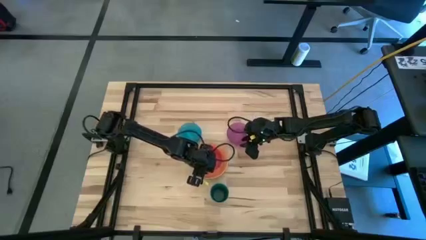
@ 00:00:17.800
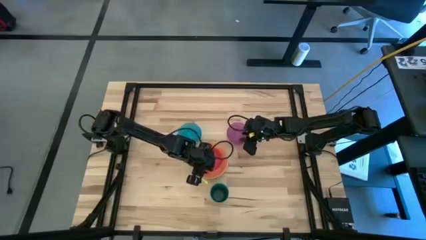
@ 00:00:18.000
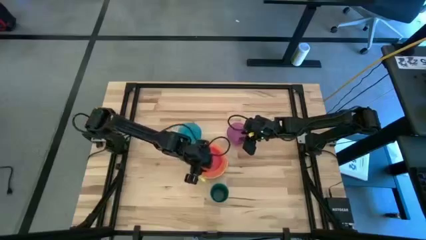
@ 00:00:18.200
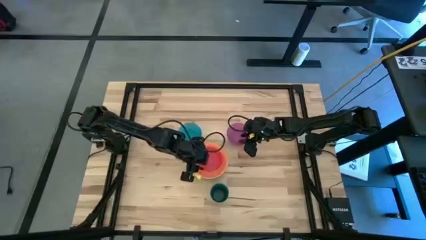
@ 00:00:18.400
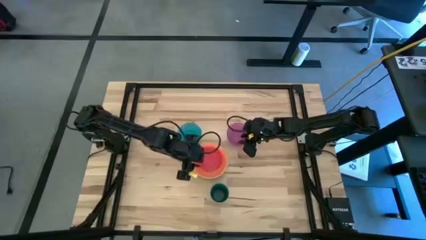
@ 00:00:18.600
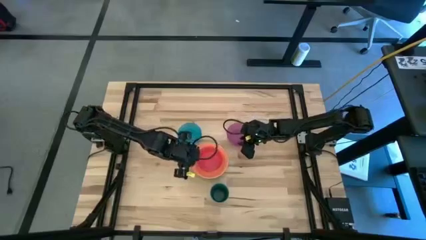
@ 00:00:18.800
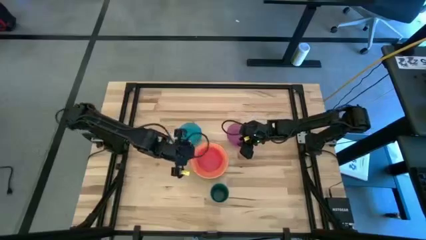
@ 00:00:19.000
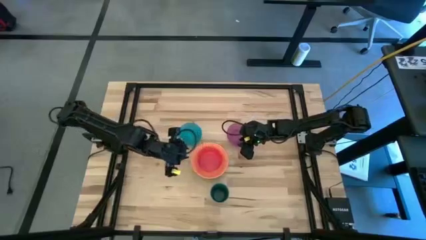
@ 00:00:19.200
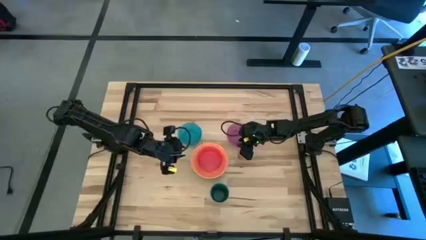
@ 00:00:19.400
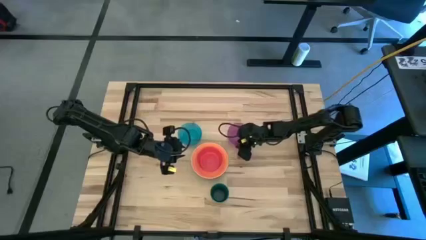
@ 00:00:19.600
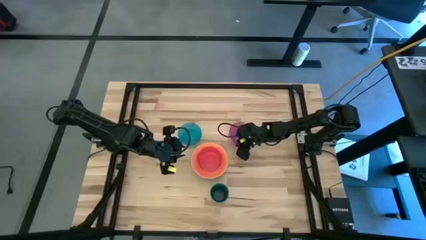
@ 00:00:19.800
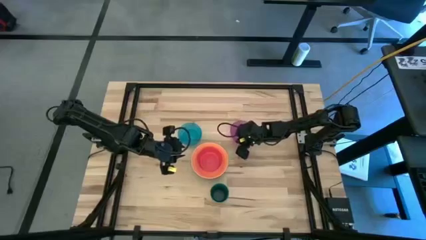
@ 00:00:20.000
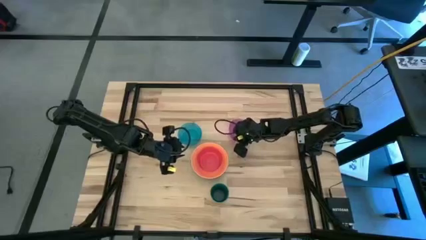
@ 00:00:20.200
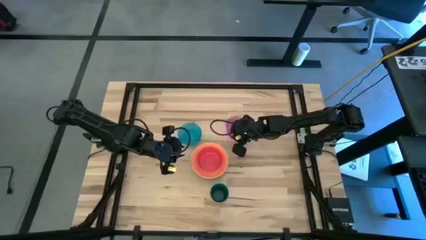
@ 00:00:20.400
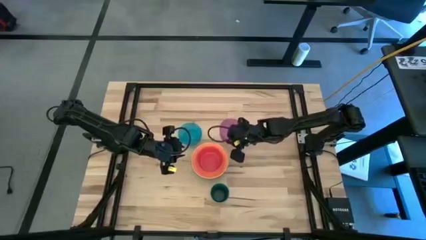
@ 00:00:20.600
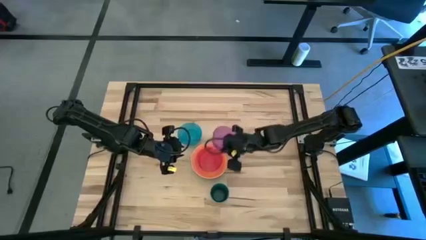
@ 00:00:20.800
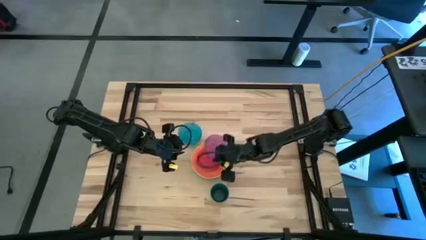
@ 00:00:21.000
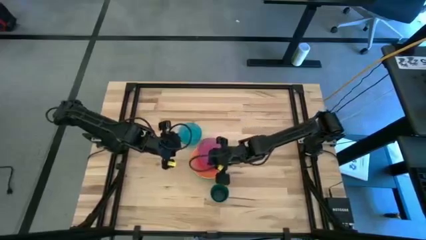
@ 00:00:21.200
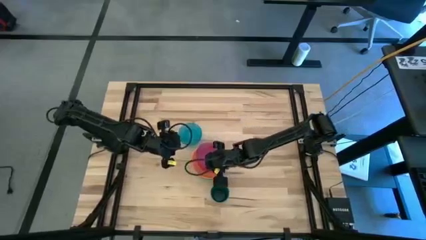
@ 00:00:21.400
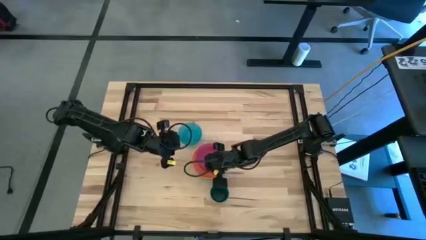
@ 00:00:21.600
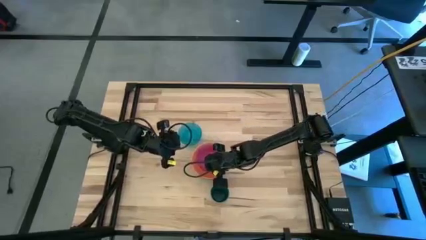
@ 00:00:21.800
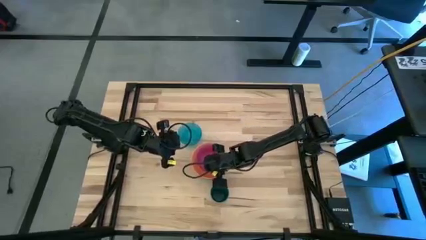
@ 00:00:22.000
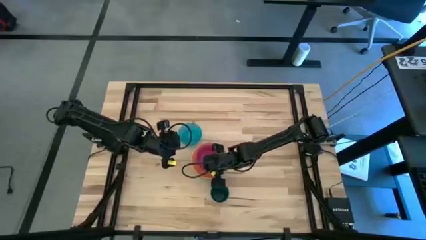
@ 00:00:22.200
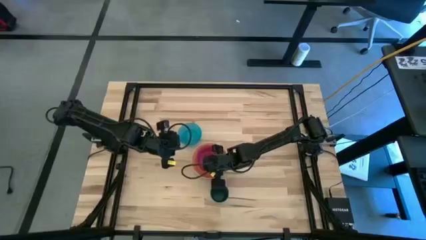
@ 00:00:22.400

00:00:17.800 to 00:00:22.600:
Stack the violet bowl on top of the red bowl

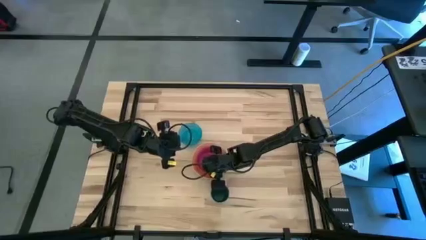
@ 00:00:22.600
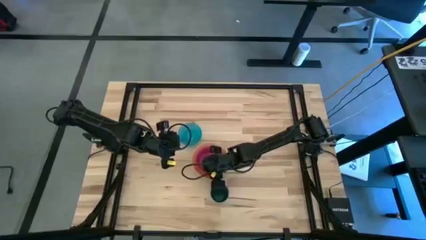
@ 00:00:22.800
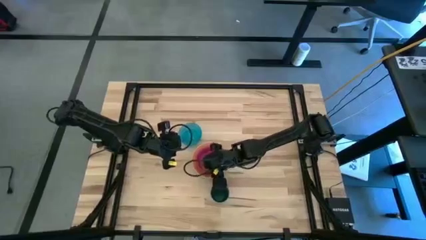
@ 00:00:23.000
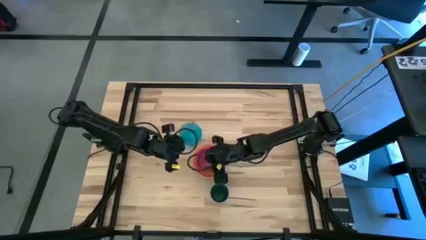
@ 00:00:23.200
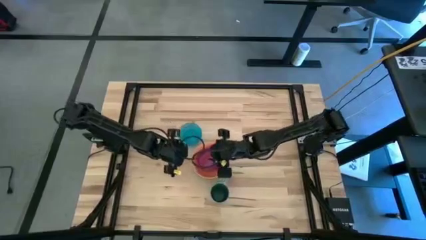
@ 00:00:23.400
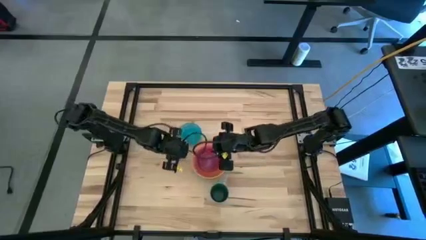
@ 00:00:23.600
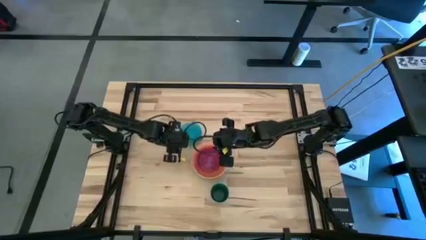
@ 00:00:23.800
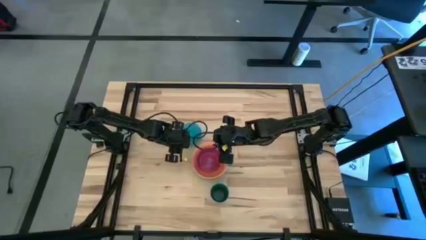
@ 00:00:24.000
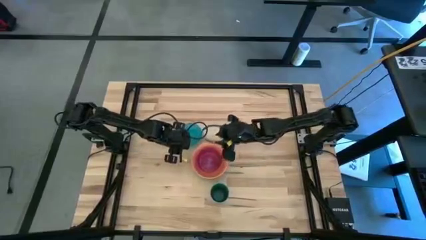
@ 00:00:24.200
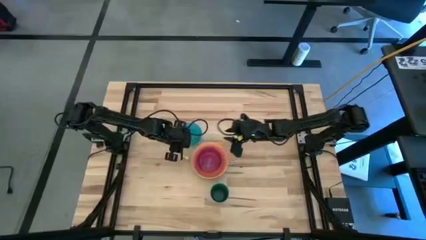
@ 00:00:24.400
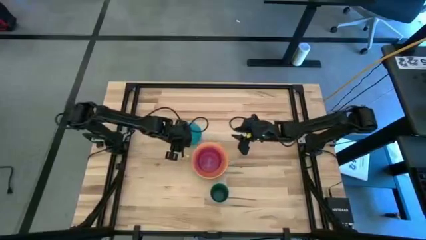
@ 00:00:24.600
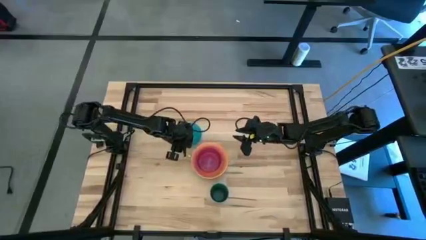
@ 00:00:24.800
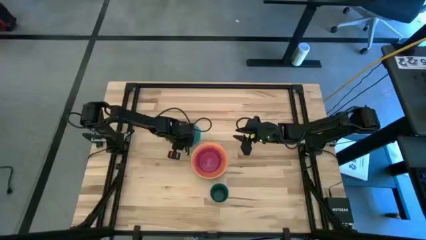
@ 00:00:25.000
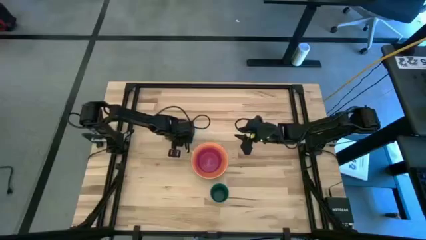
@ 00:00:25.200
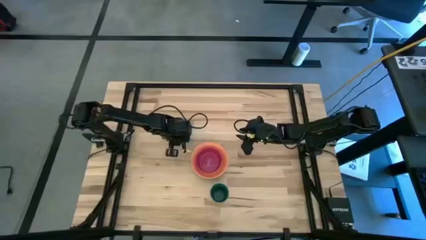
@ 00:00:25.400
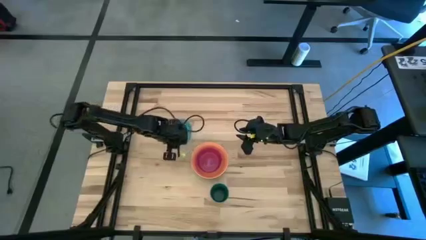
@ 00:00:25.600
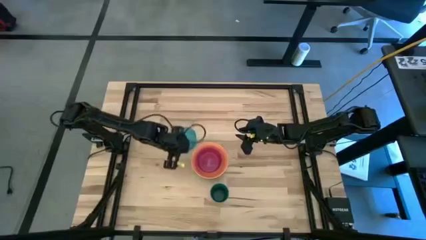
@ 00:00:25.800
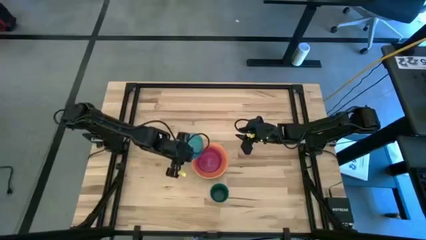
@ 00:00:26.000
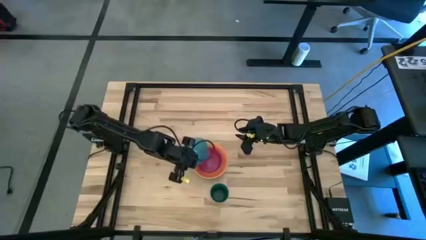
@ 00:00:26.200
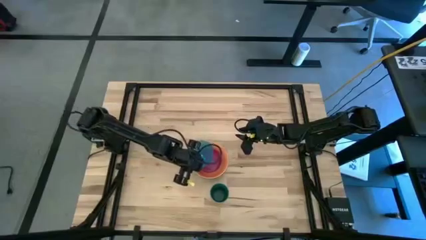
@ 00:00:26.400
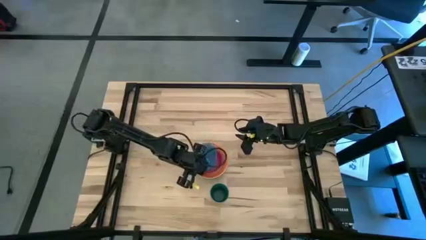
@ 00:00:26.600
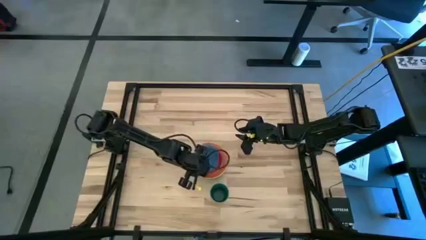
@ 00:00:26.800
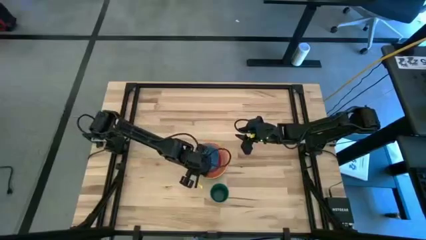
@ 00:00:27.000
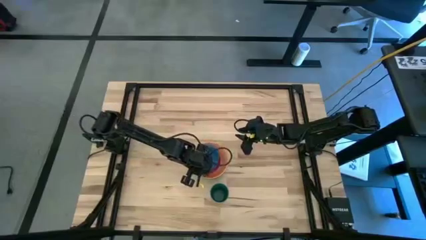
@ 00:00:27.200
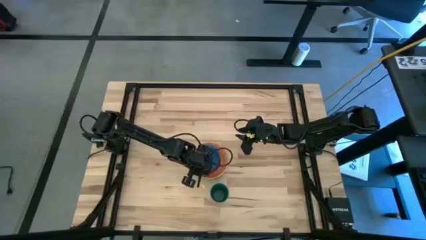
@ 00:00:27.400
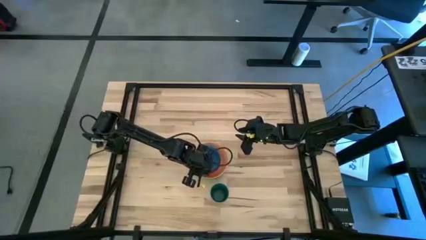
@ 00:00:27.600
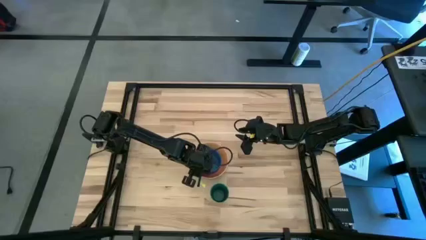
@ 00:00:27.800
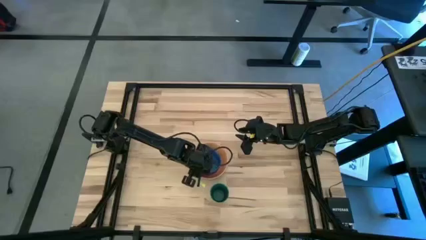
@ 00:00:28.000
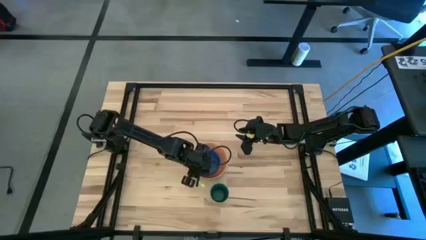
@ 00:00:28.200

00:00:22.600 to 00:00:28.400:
Stack the blue bowl on top of the violet bowl

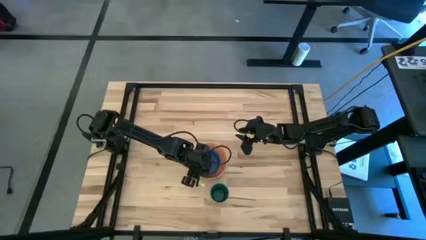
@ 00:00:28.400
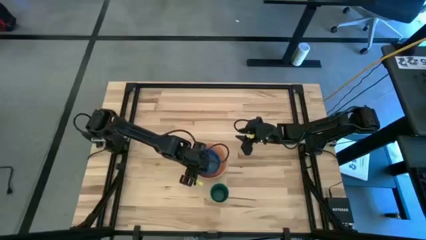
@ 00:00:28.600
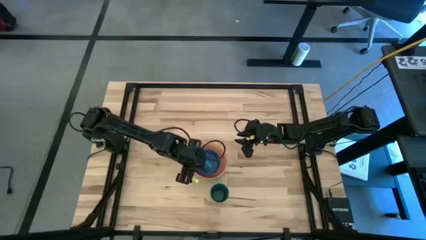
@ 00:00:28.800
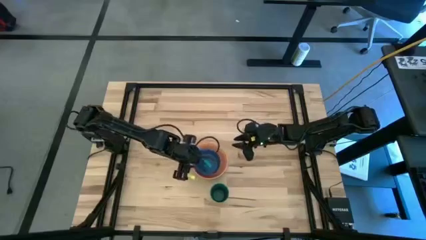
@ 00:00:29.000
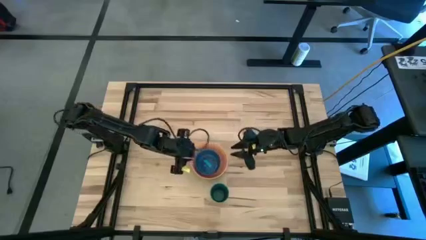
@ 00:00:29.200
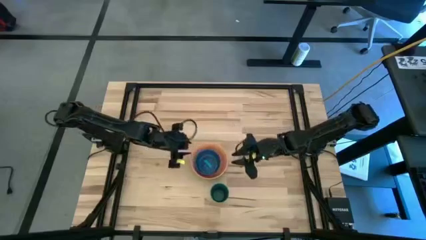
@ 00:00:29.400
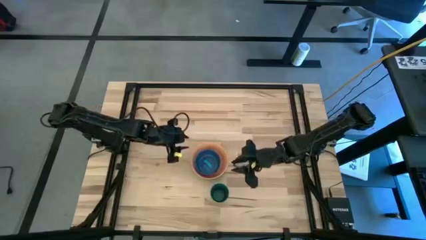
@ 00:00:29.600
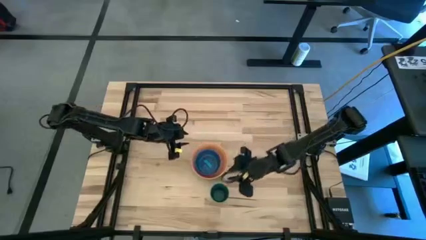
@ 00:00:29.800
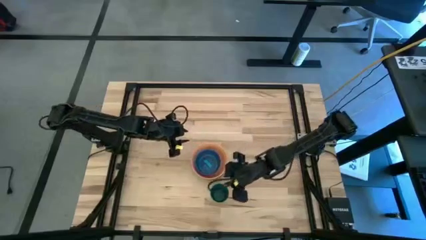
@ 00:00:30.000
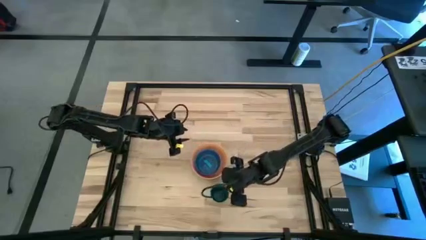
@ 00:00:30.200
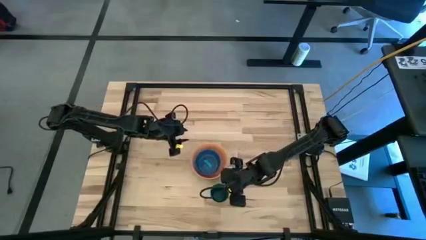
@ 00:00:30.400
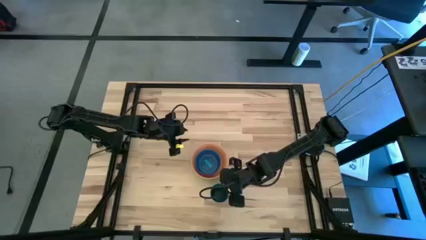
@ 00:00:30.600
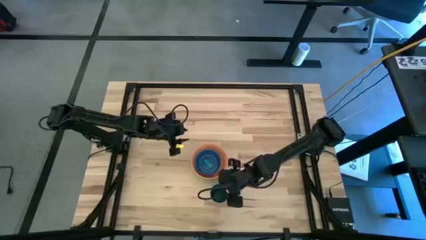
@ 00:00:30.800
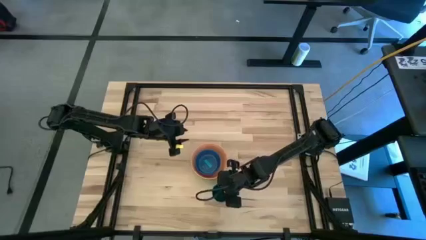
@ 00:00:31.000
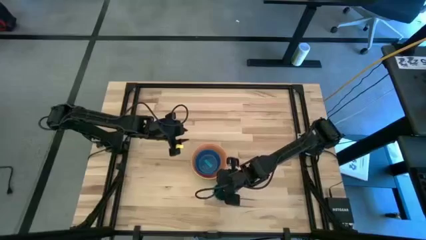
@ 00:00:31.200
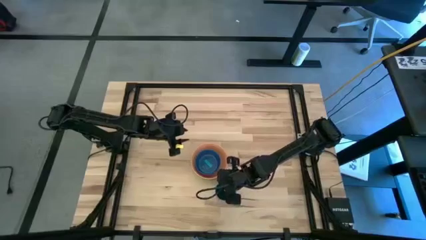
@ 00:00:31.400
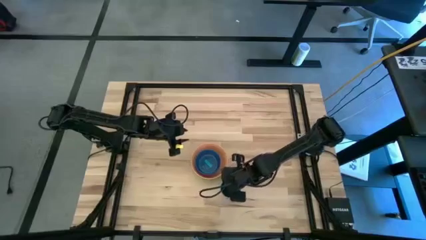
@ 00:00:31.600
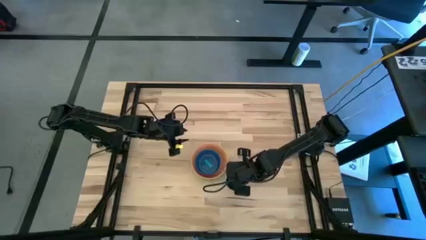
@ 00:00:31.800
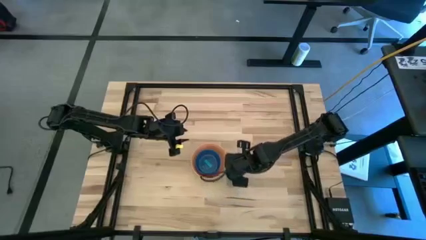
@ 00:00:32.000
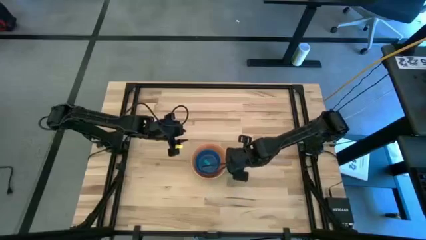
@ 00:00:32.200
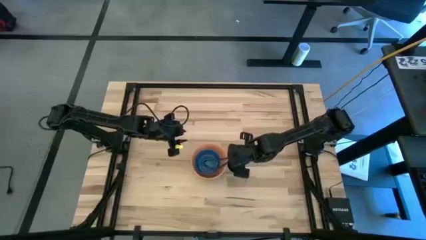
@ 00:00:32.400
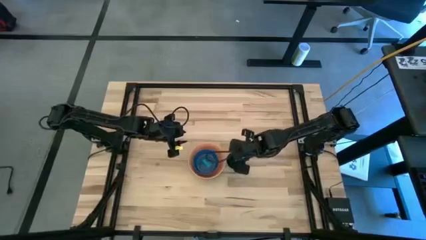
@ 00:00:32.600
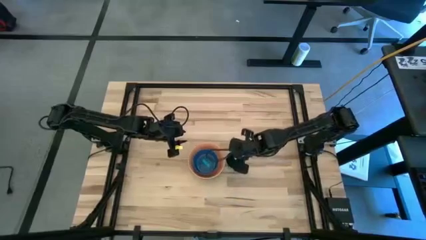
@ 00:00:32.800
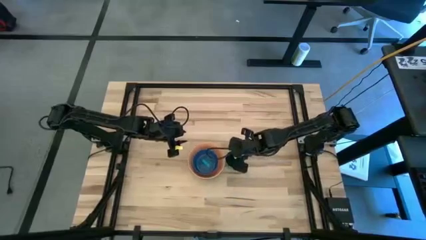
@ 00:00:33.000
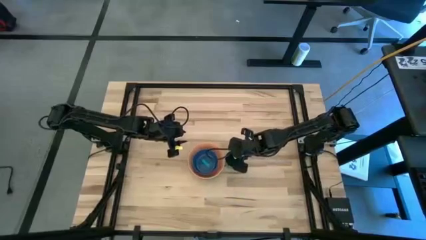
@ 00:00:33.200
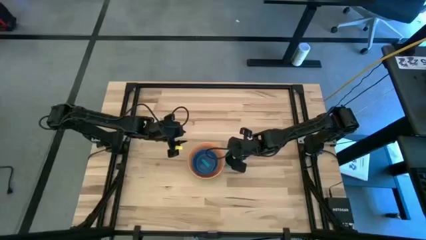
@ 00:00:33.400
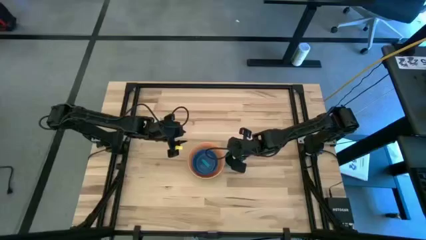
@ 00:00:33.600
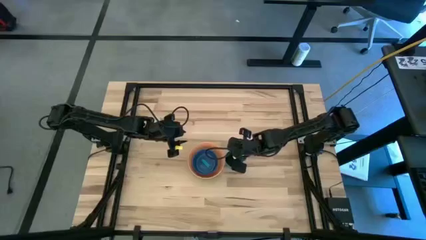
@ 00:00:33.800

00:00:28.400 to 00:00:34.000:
Move the green cup to the right of the stacked bowls
